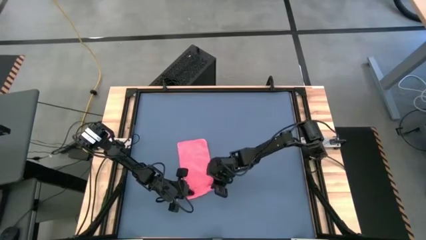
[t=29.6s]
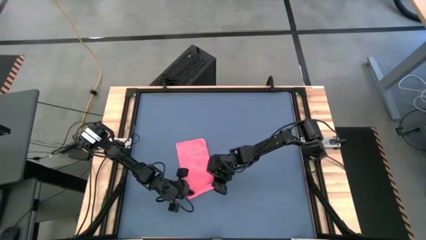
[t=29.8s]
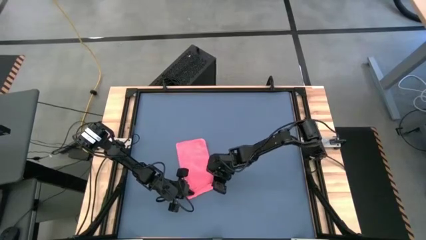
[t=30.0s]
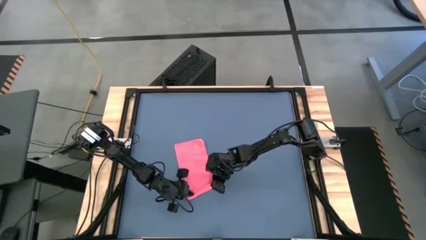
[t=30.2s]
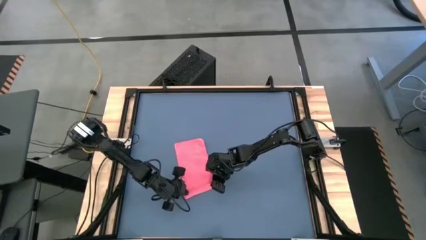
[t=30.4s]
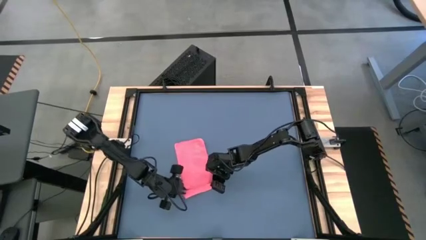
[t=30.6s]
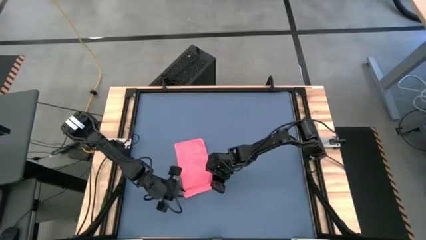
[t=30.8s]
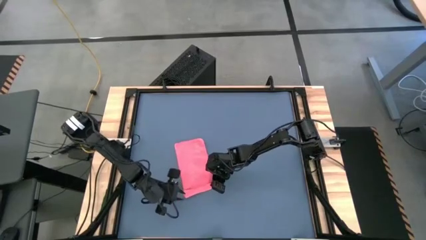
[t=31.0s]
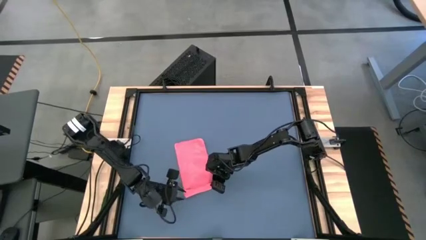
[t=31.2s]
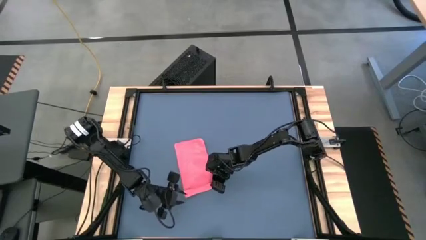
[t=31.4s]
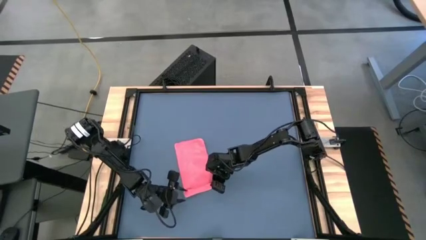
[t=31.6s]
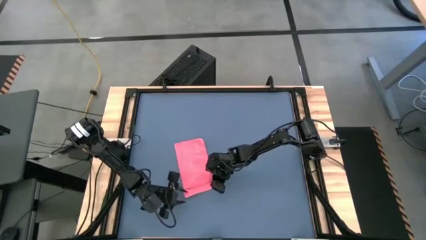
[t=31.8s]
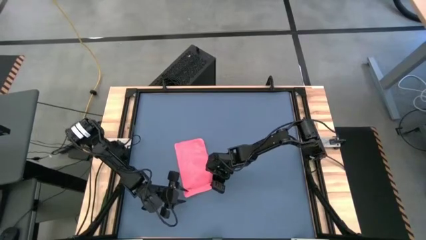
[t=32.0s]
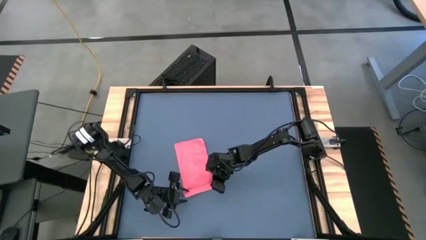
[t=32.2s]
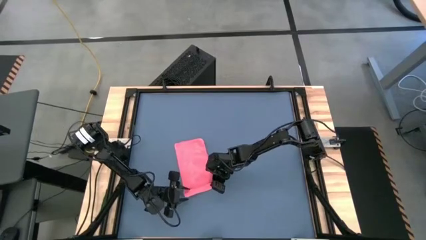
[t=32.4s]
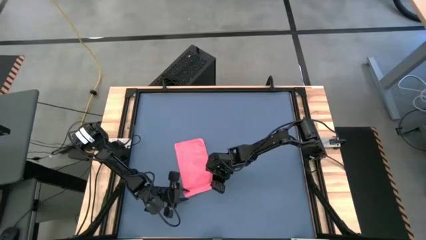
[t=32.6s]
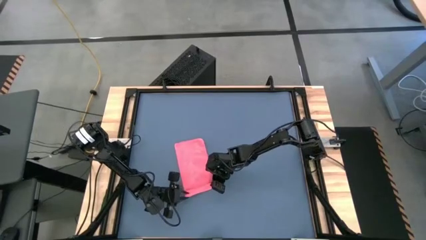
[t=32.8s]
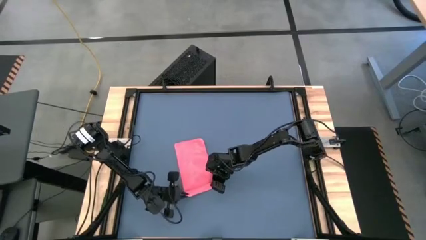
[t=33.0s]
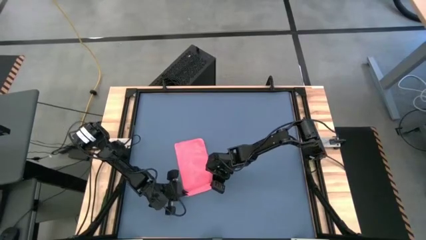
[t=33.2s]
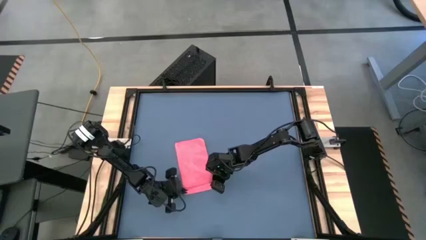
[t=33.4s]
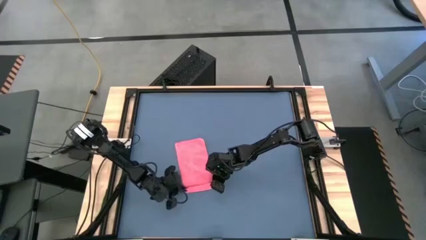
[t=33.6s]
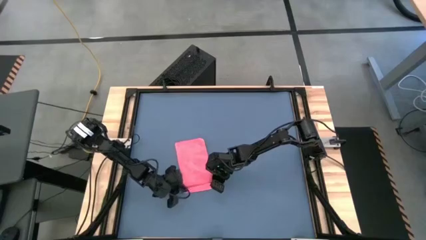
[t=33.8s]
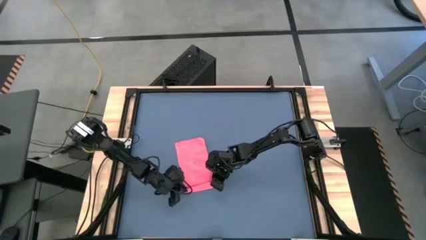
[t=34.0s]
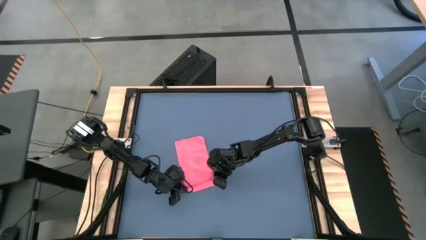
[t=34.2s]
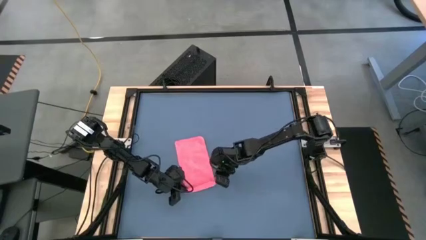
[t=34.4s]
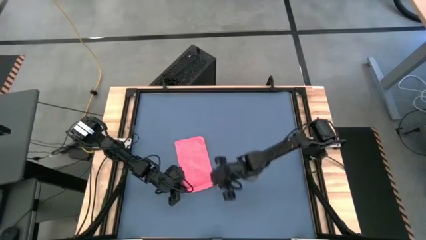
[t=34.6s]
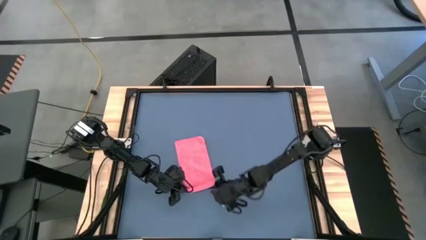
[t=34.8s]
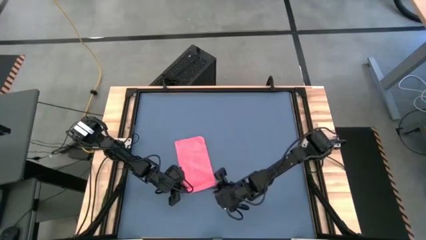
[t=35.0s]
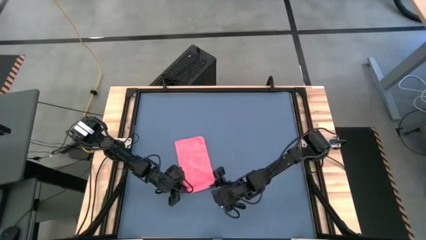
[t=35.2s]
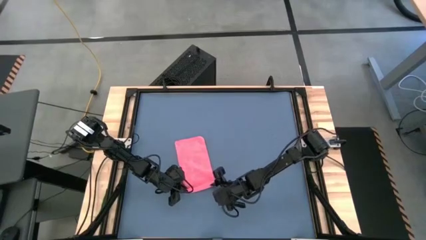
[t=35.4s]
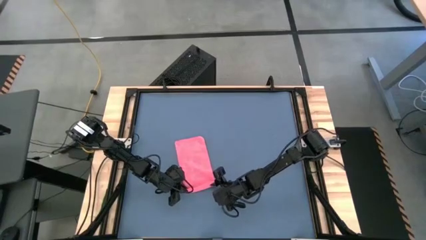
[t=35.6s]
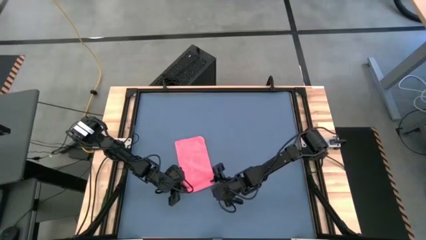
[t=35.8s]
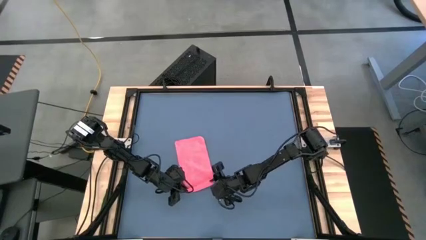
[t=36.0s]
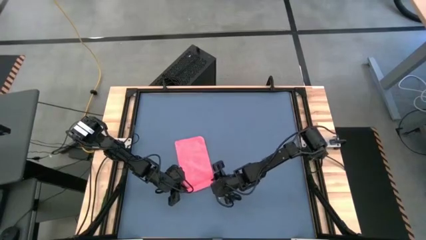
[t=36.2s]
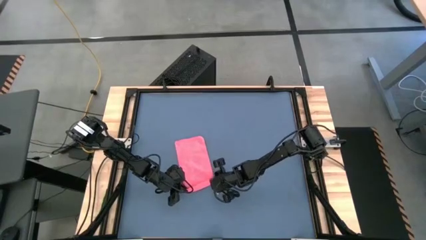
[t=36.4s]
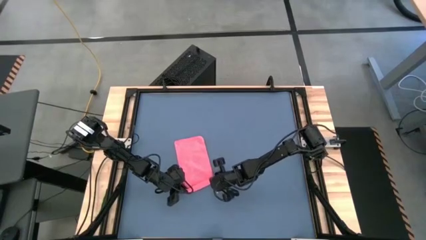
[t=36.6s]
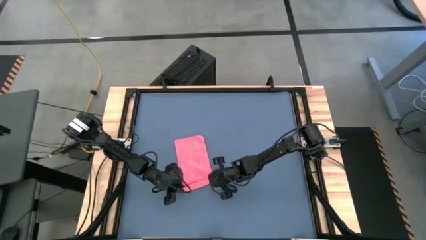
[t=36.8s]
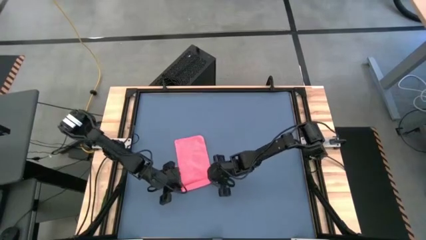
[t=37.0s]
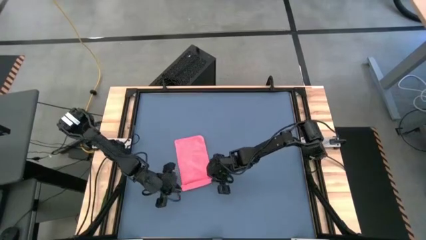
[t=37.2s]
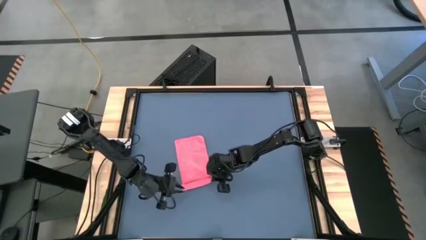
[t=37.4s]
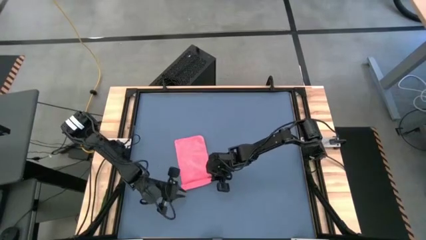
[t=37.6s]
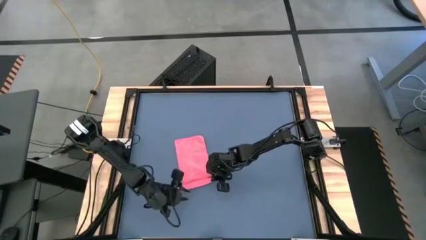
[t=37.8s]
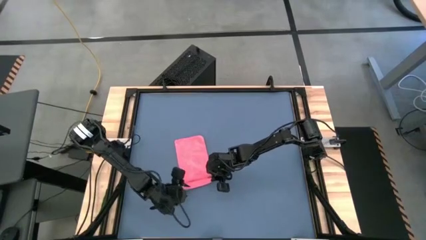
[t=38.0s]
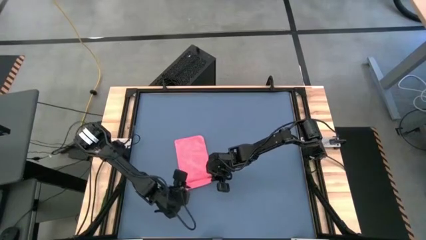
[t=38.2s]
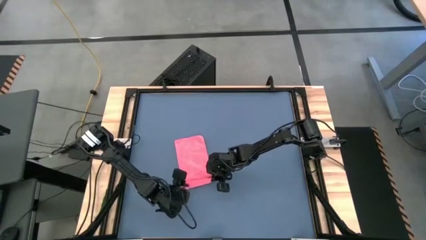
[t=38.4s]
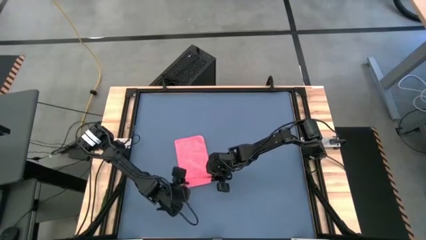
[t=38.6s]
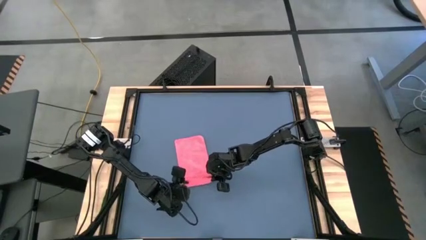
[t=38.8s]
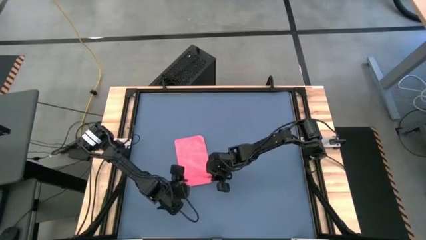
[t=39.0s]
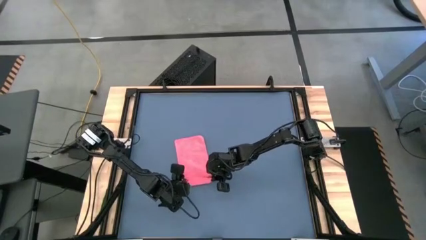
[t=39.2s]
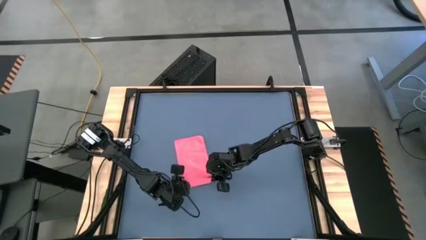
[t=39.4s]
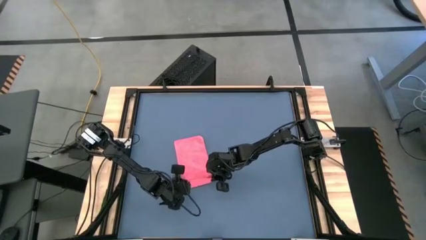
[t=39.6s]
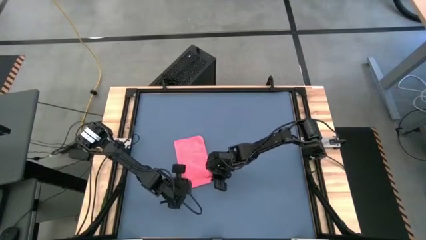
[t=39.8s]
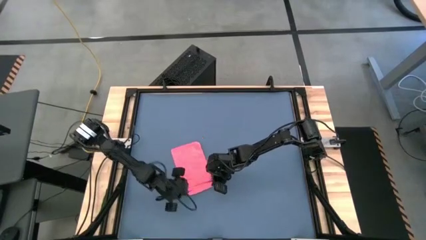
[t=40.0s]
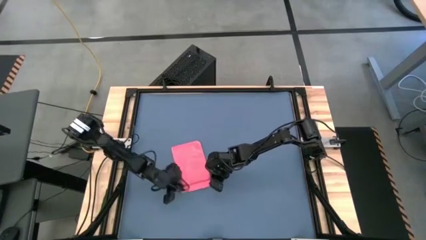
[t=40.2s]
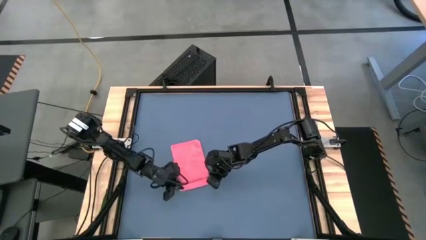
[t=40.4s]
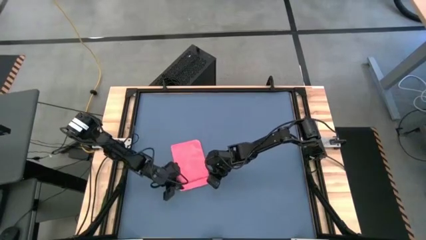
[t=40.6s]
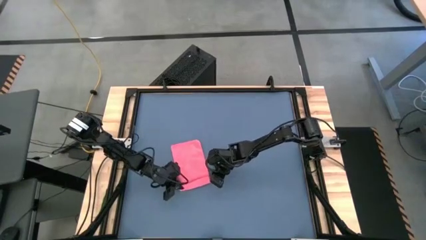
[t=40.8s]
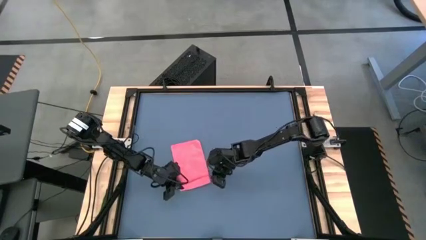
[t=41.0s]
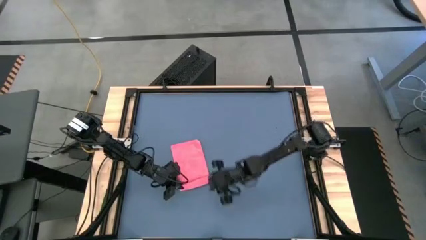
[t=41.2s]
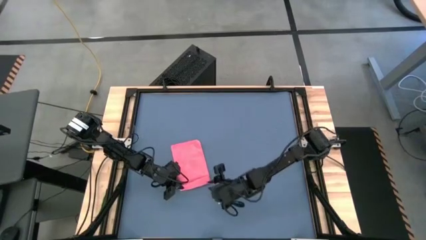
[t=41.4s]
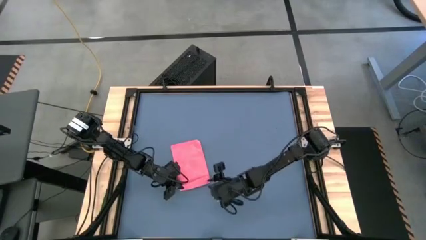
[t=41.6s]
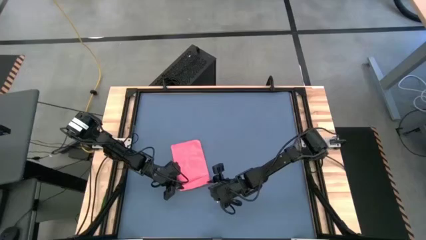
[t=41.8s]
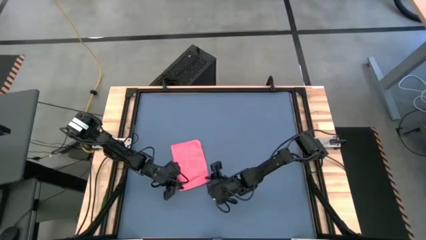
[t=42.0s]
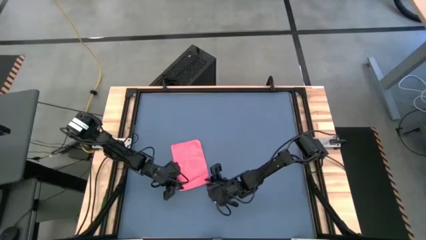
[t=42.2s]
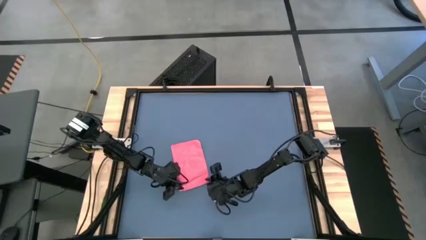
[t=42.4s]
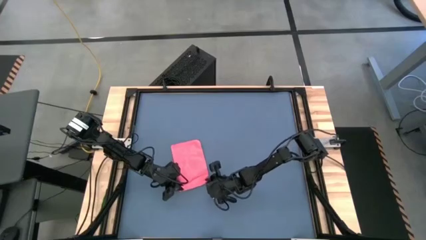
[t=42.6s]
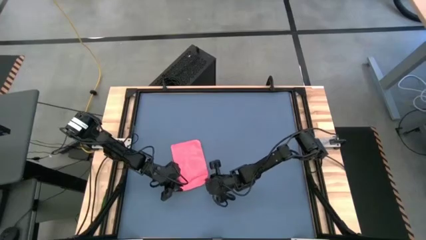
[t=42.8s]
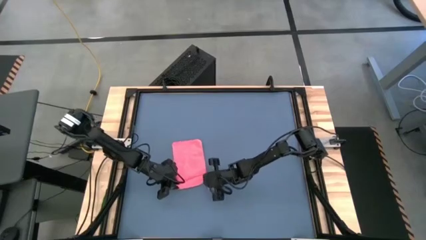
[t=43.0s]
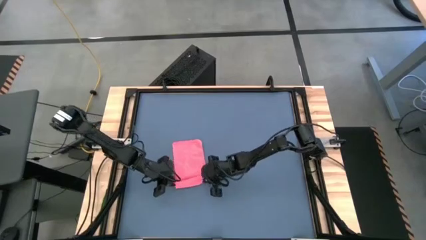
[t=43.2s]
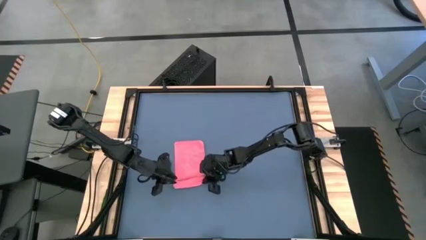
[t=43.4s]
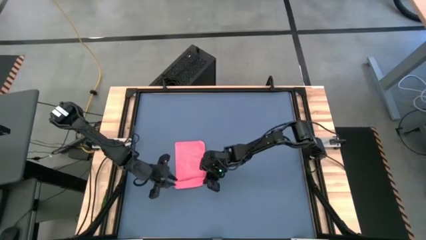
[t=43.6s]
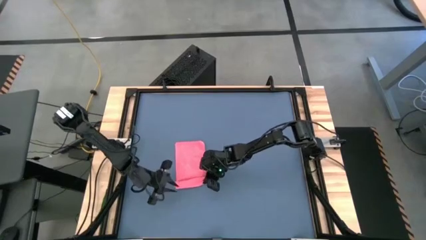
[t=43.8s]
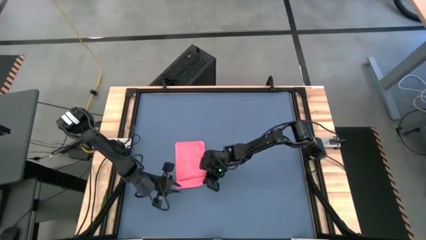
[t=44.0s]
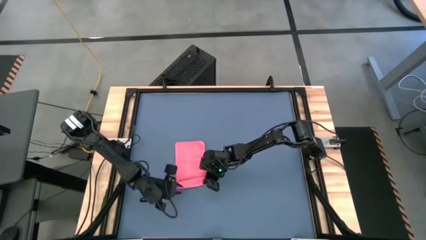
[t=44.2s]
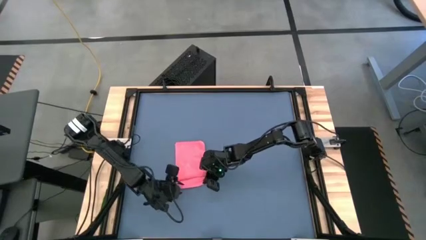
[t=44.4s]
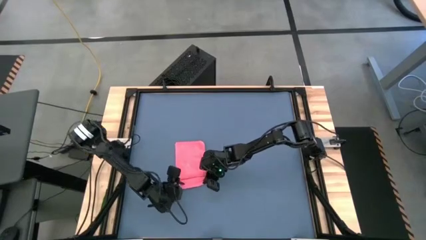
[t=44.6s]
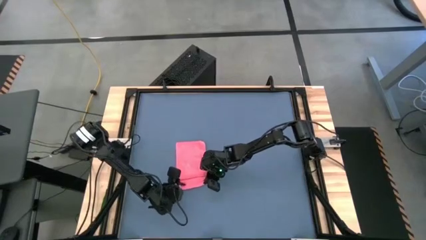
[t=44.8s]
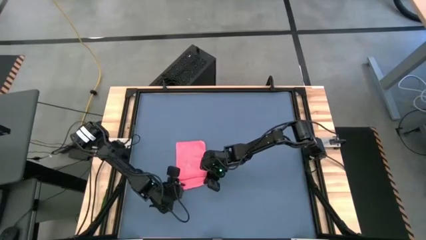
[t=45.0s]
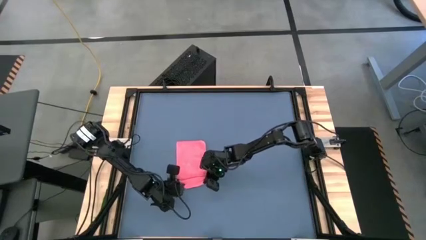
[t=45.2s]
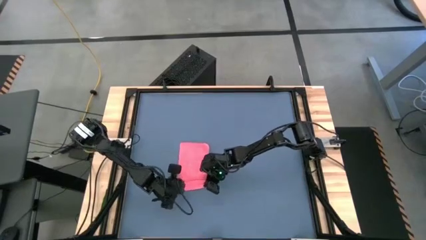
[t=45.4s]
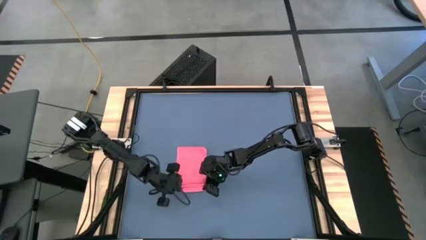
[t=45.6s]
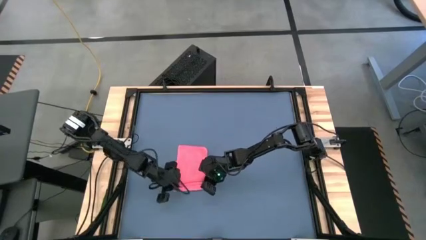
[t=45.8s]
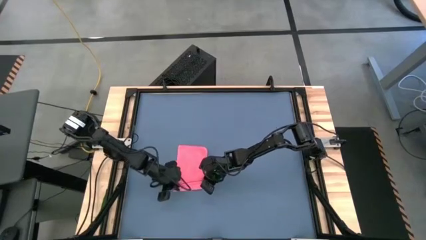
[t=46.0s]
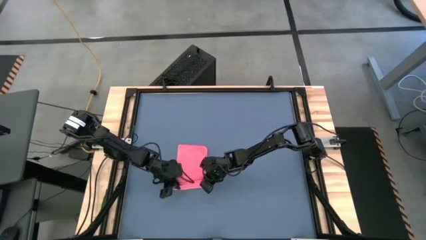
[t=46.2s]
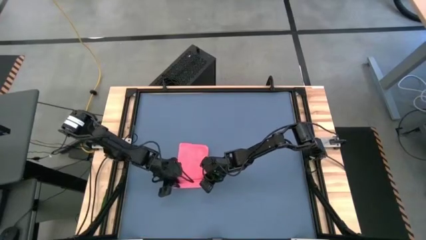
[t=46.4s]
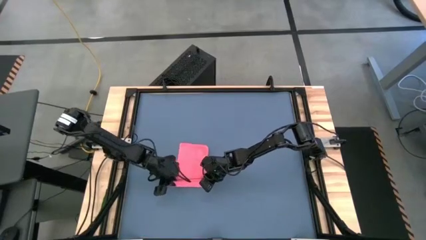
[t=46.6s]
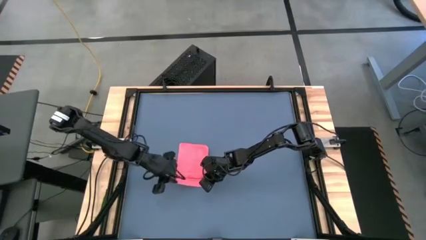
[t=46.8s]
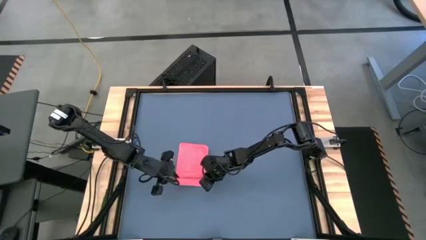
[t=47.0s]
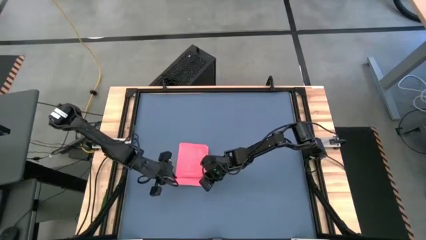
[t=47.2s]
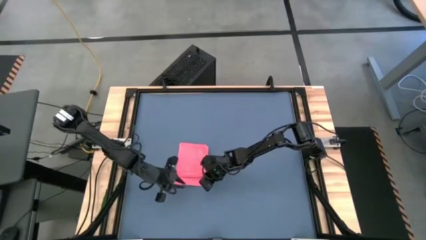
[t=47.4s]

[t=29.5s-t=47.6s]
Task: Roll towel into tight, uniform cylinder
Roll the red towel
